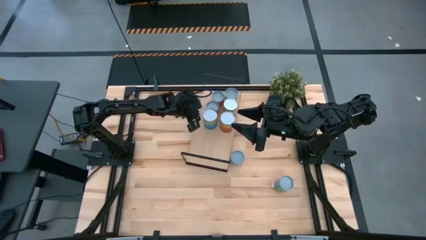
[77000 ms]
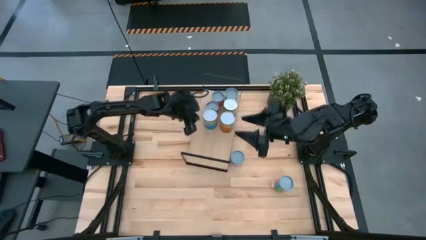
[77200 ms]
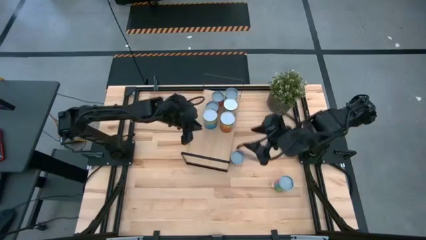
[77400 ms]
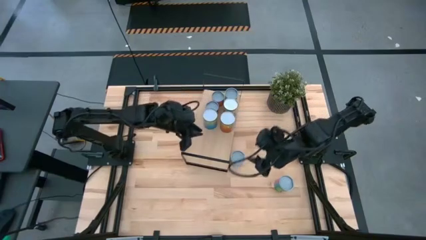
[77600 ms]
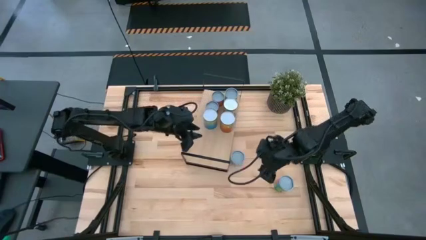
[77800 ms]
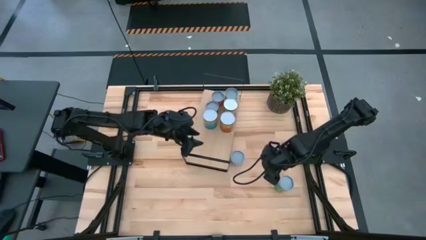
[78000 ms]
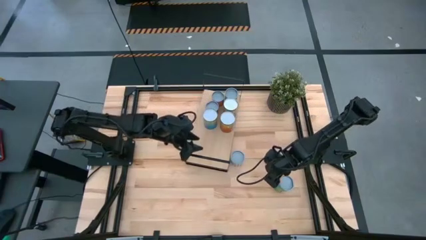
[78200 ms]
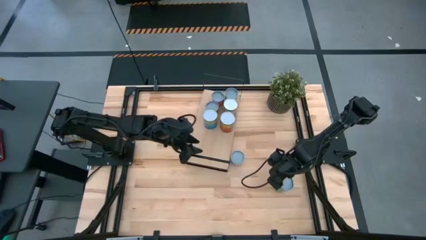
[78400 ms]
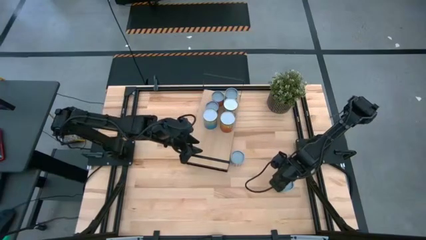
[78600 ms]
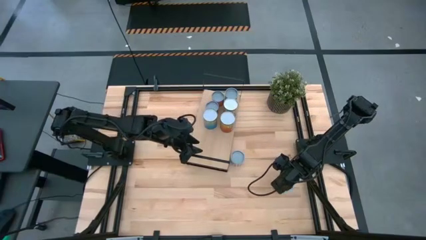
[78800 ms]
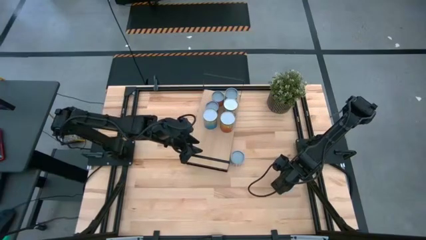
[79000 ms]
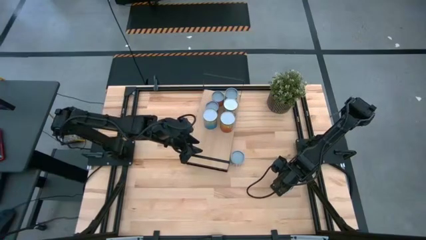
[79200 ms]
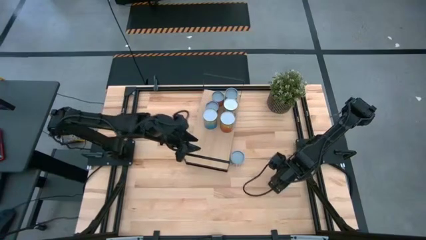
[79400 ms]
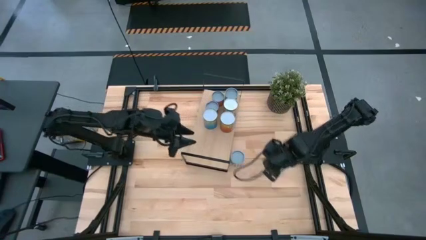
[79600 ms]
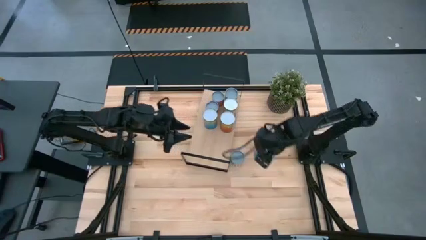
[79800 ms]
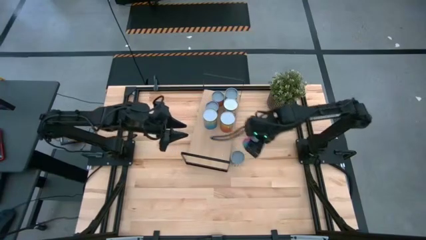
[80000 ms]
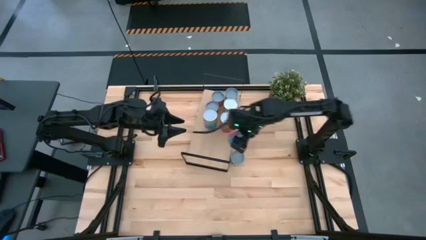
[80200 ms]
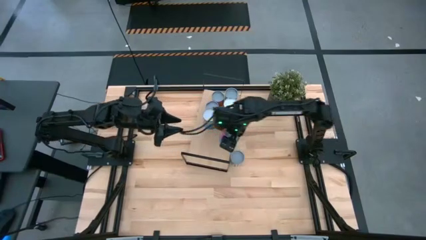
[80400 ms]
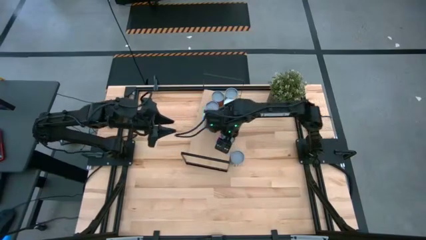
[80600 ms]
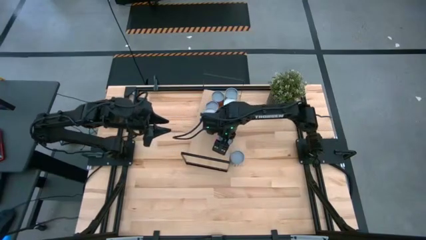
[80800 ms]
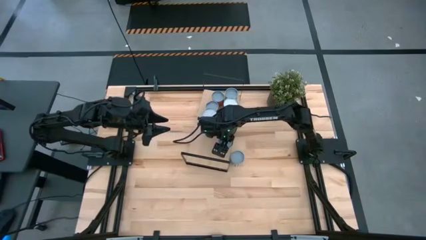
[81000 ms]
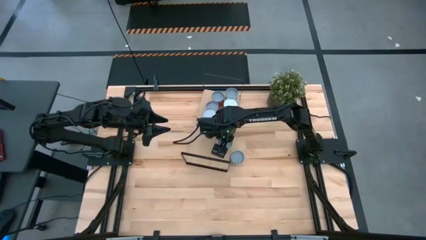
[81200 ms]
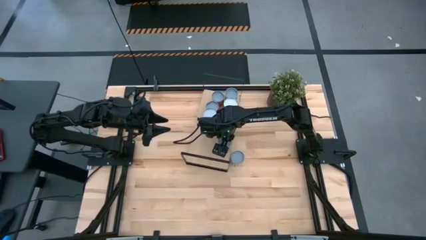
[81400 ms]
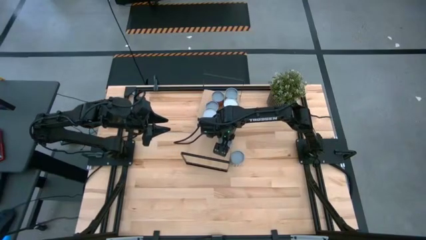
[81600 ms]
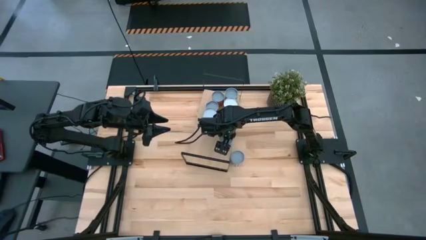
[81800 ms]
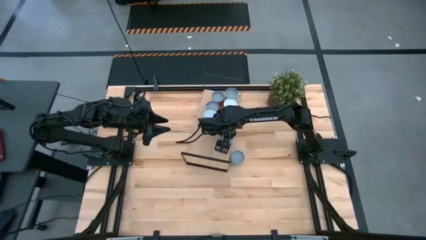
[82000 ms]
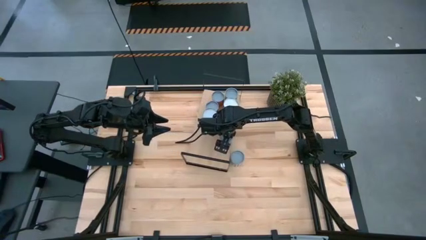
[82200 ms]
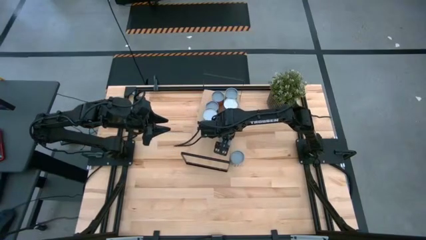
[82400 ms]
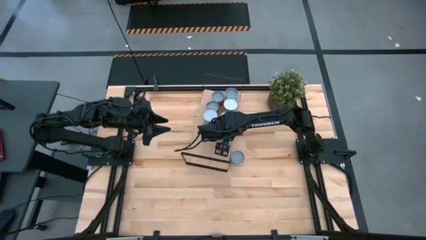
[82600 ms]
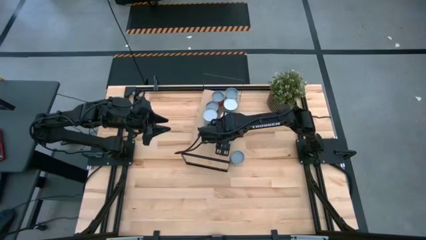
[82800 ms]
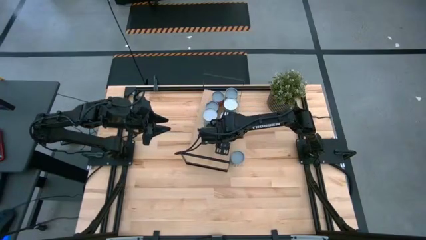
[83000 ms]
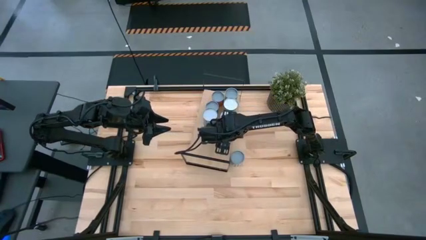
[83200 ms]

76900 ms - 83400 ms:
Task: Pick and place cans onto a shelf
Put the green can on the shelf

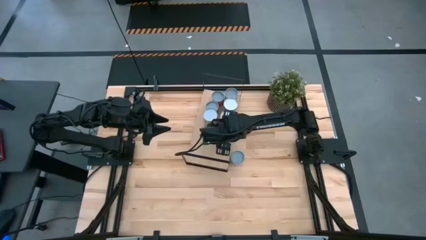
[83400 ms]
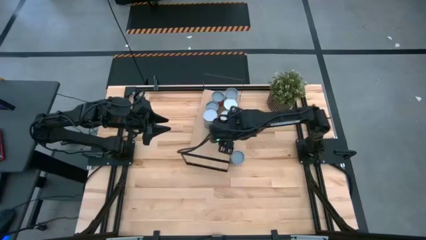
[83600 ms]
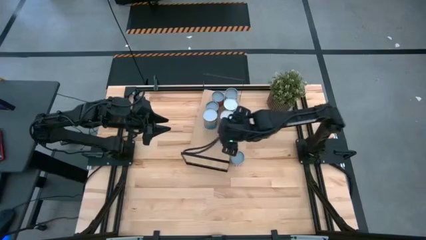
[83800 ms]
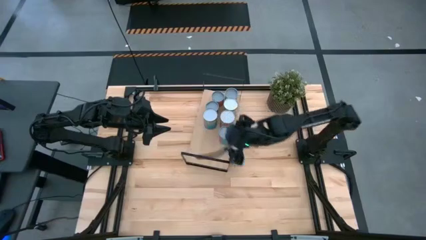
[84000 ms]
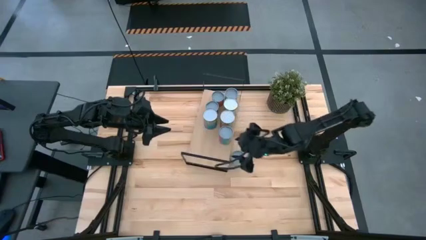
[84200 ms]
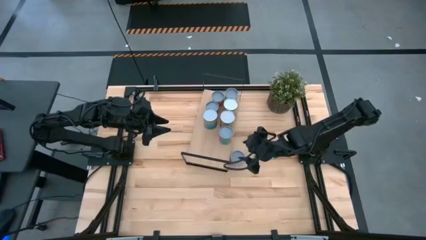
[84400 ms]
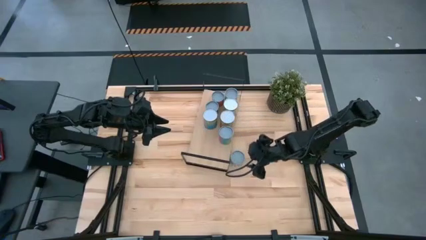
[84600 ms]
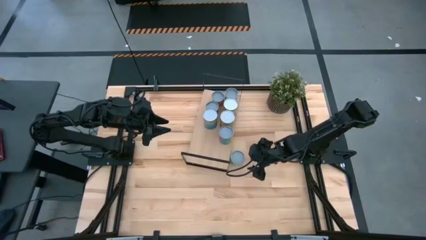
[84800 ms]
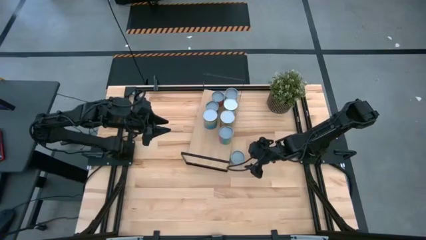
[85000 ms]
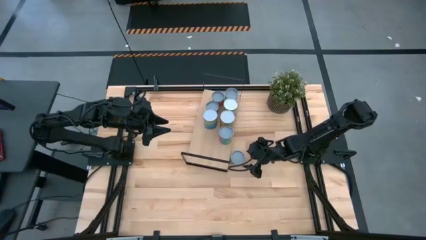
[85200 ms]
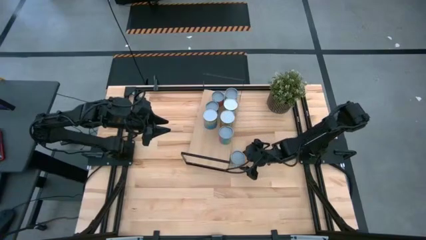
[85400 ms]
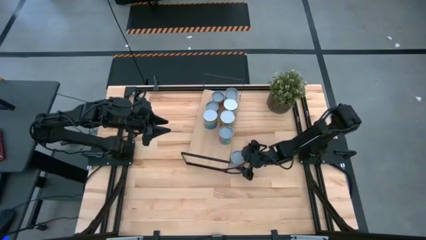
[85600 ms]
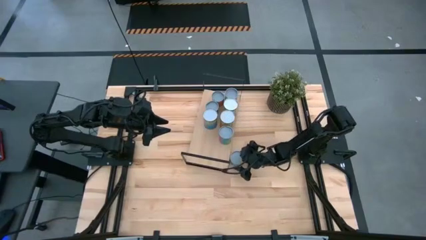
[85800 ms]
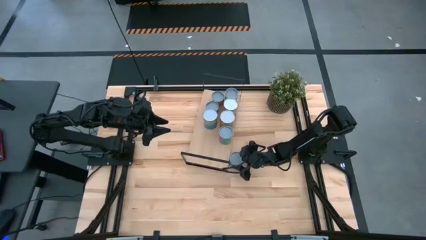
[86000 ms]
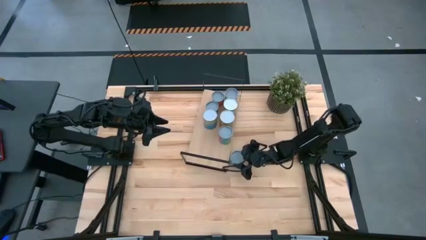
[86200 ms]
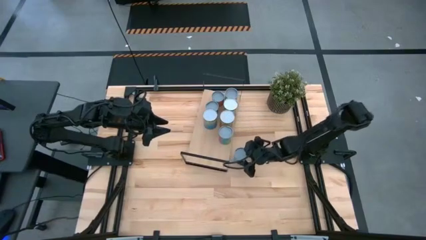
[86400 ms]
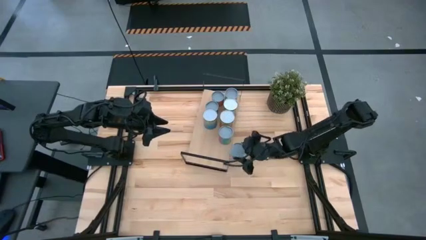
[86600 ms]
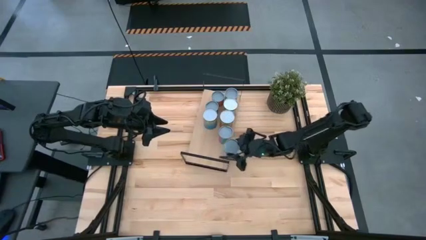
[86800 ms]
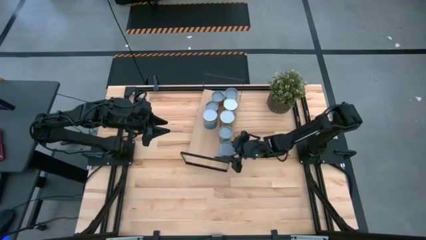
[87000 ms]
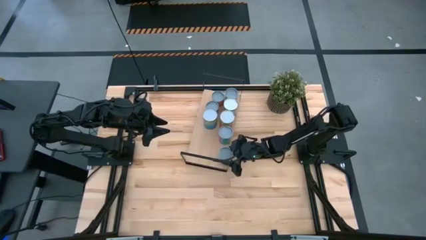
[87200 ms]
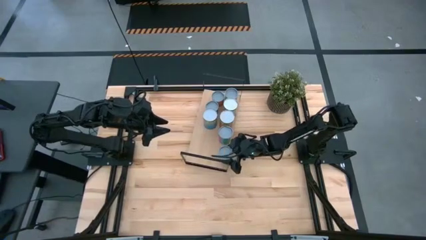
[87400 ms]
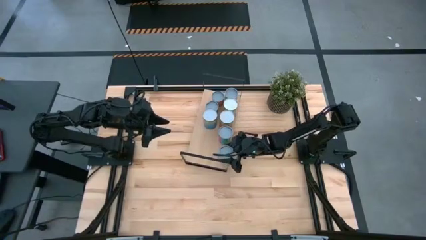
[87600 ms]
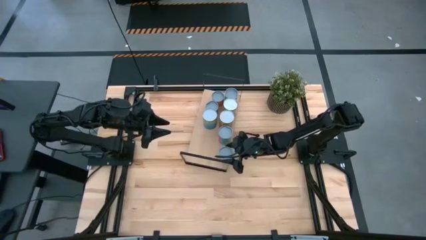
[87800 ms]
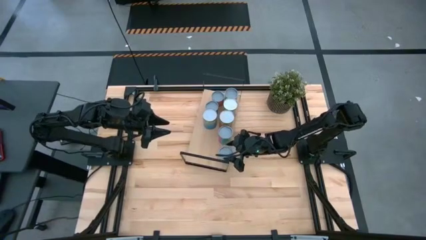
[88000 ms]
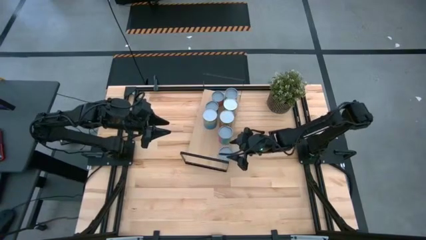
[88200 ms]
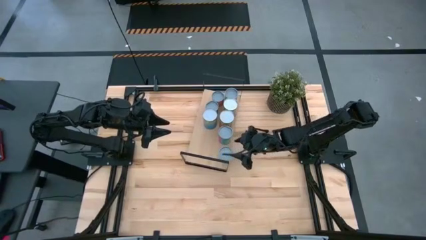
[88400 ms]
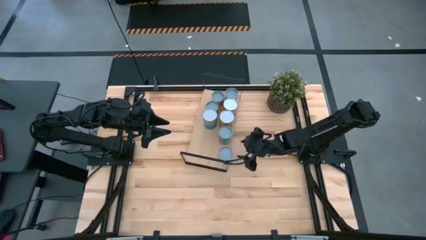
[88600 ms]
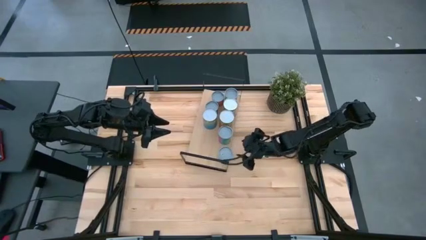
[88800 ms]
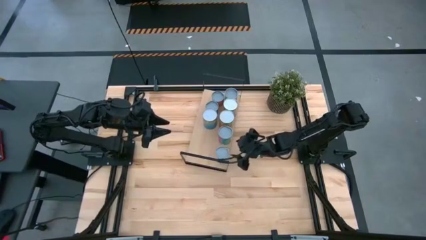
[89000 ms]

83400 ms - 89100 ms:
Put the white can on the shelf
